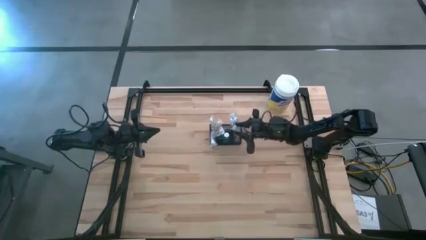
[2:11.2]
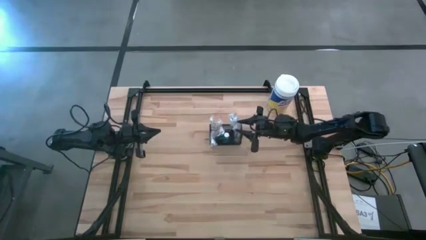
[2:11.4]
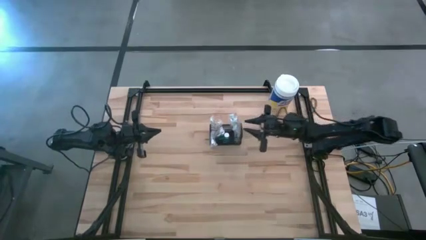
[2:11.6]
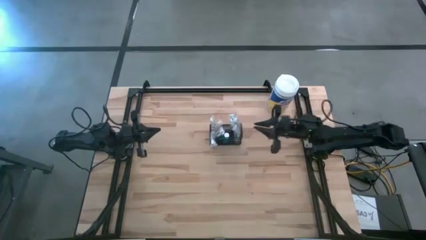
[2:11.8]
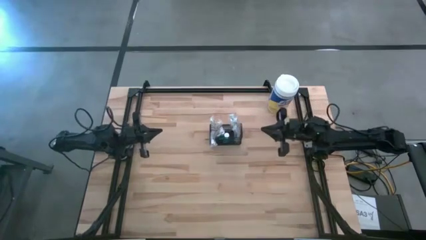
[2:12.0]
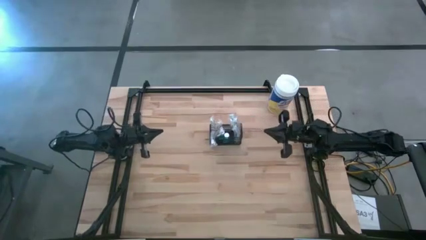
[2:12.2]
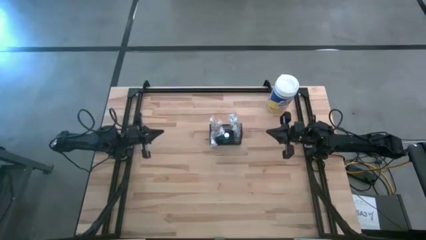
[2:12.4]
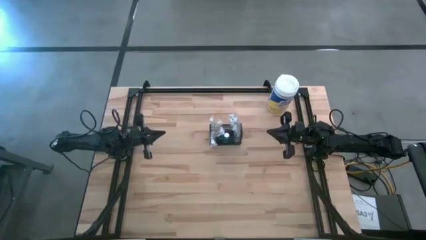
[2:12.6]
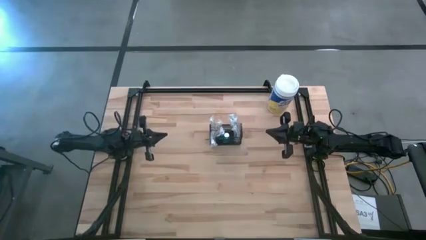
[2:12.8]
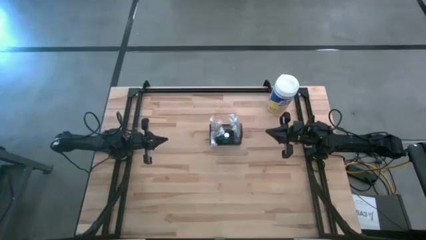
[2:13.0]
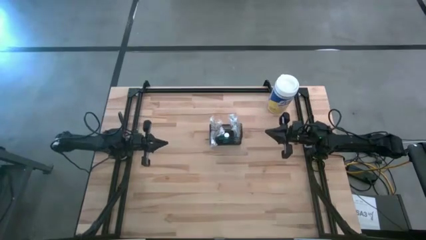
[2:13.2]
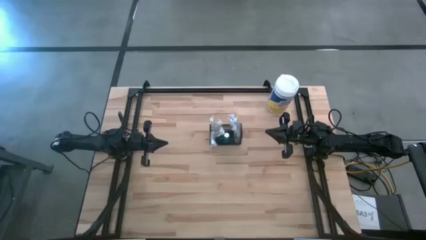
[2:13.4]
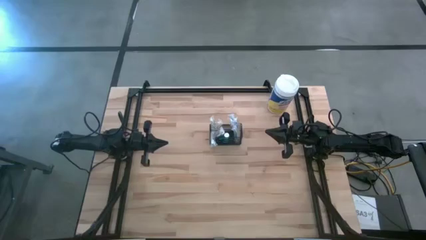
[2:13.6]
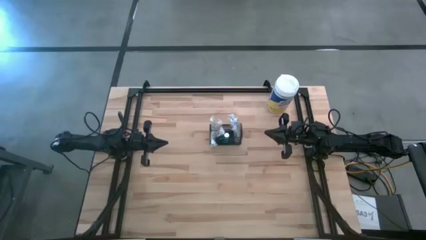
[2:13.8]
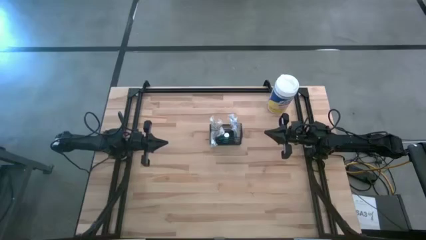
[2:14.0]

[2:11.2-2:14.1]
Task: Pick & Place toothbrushing station
Return to Home Position

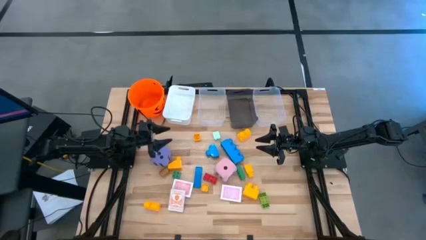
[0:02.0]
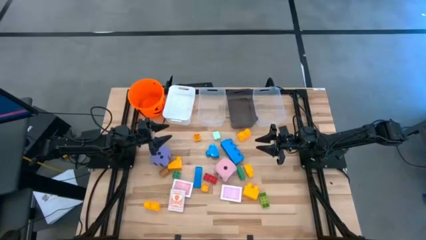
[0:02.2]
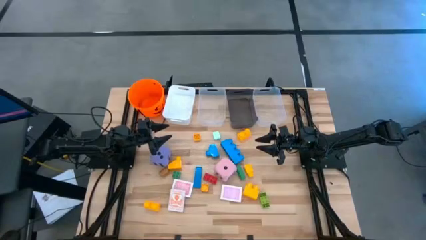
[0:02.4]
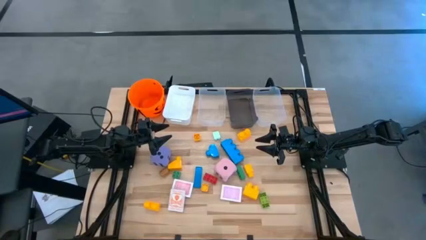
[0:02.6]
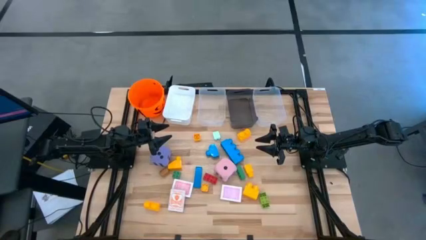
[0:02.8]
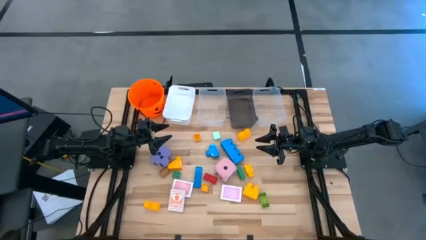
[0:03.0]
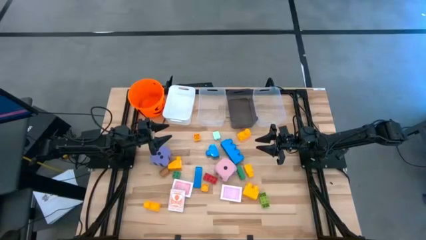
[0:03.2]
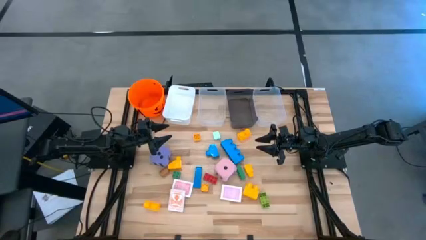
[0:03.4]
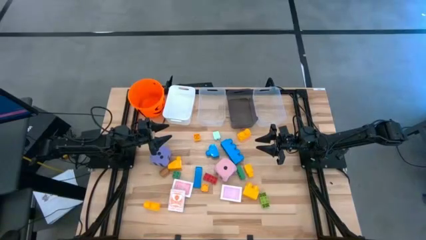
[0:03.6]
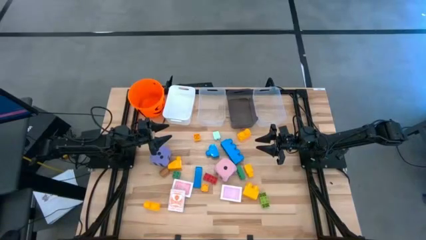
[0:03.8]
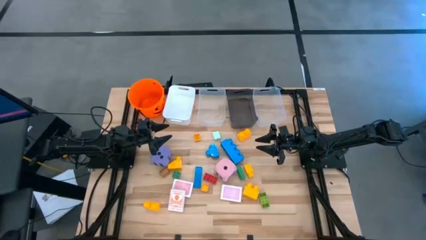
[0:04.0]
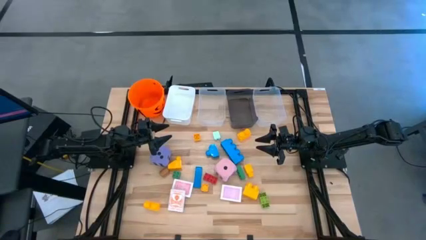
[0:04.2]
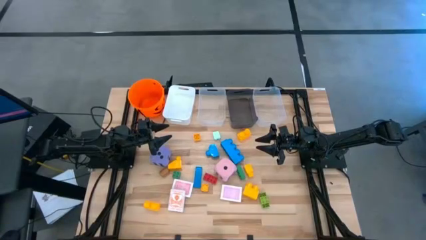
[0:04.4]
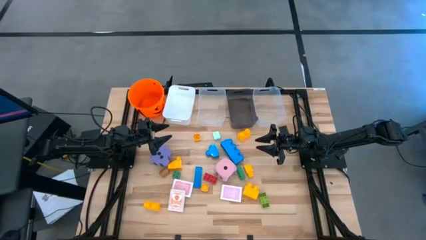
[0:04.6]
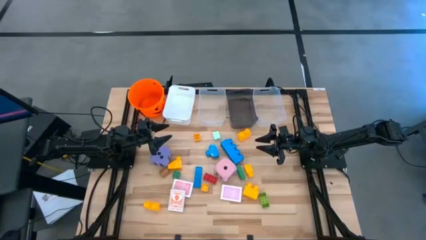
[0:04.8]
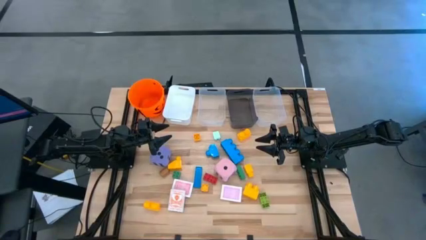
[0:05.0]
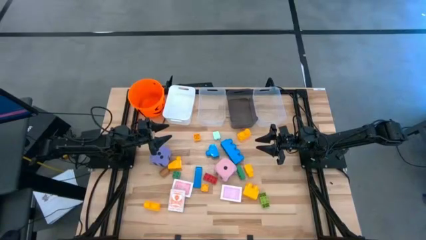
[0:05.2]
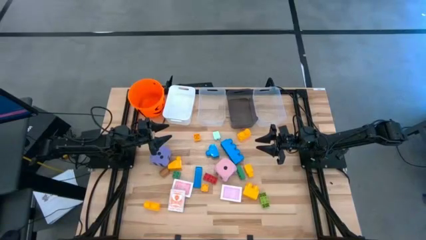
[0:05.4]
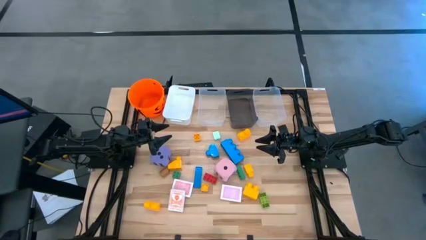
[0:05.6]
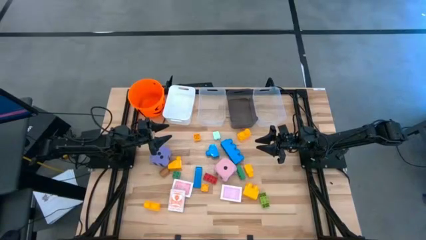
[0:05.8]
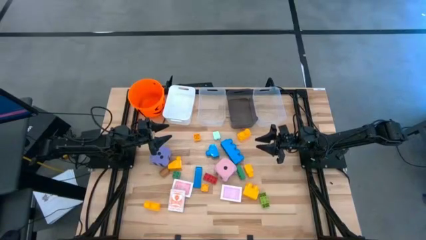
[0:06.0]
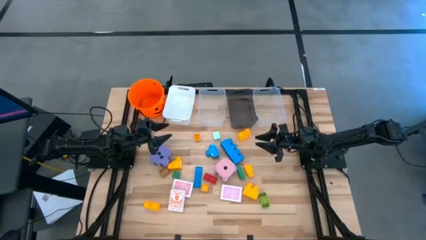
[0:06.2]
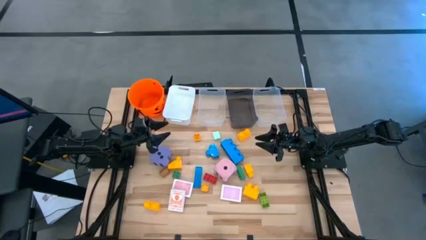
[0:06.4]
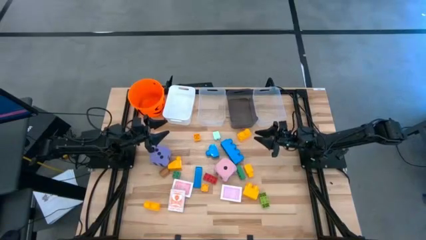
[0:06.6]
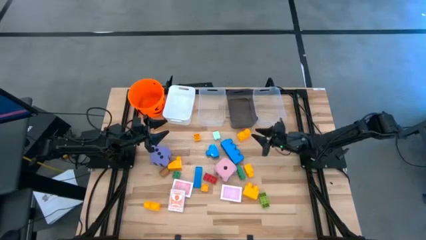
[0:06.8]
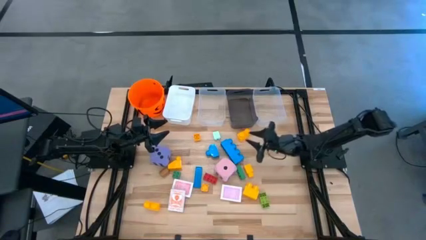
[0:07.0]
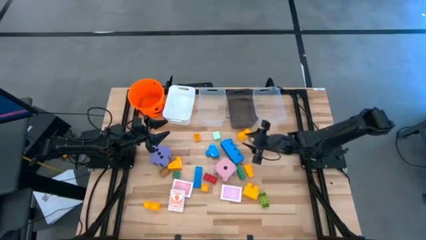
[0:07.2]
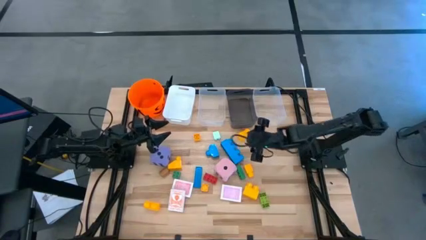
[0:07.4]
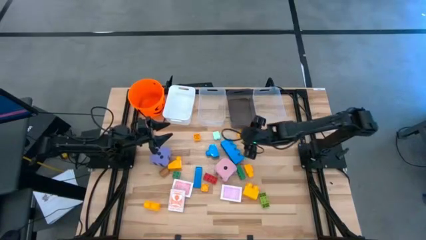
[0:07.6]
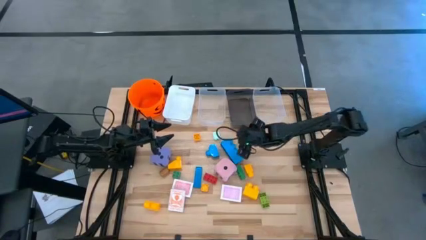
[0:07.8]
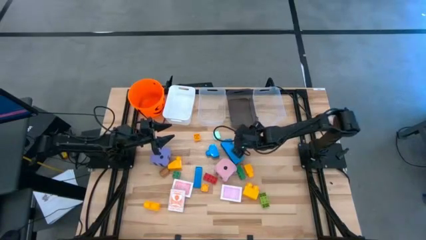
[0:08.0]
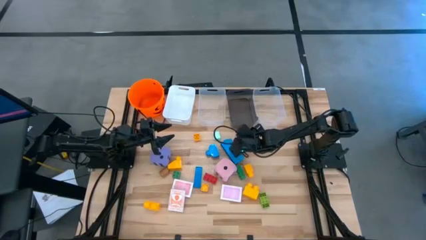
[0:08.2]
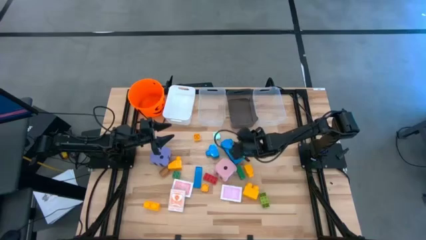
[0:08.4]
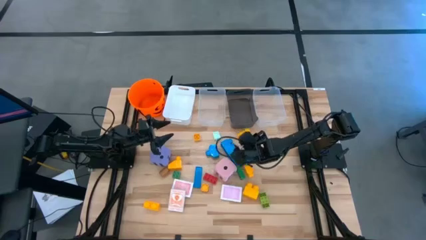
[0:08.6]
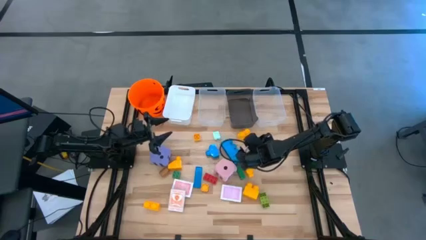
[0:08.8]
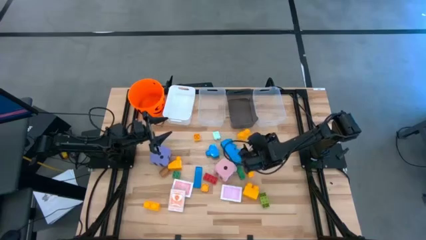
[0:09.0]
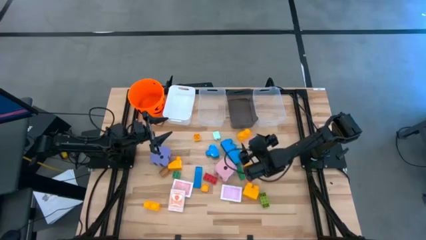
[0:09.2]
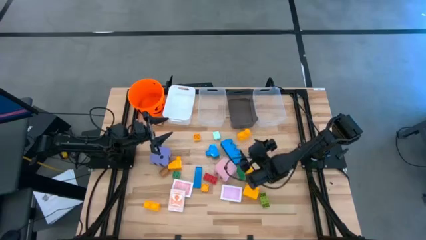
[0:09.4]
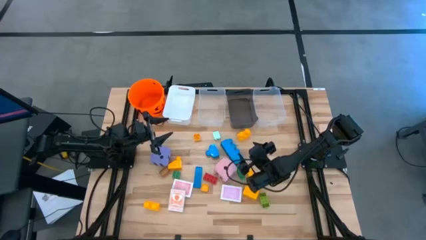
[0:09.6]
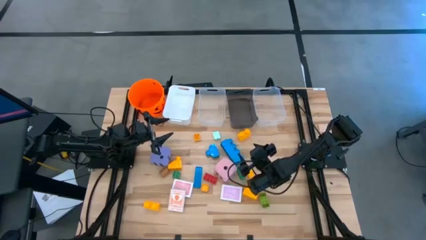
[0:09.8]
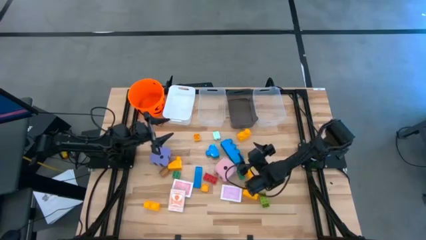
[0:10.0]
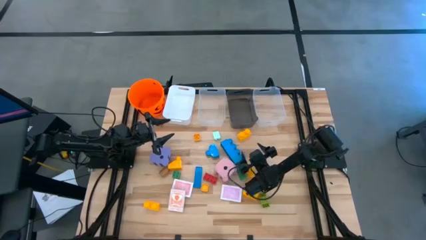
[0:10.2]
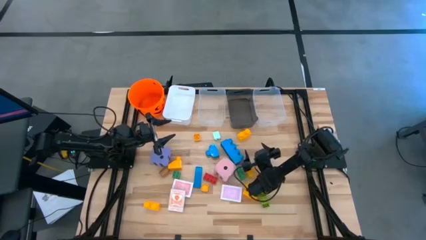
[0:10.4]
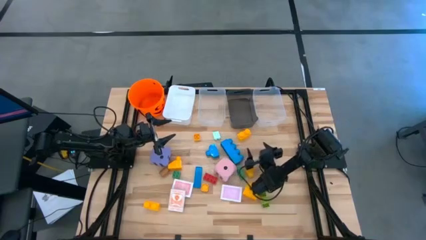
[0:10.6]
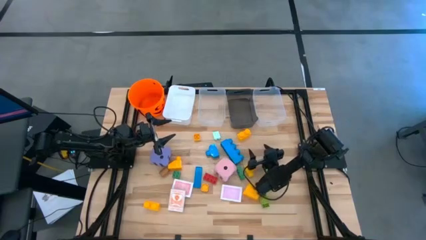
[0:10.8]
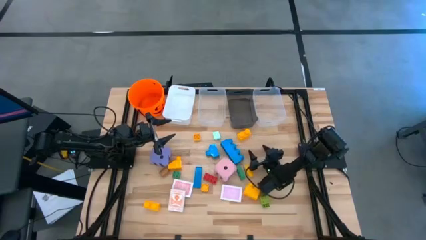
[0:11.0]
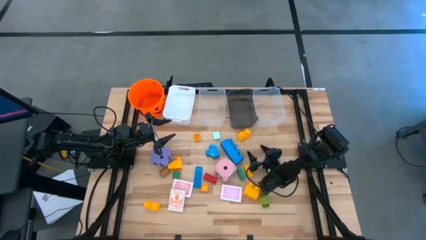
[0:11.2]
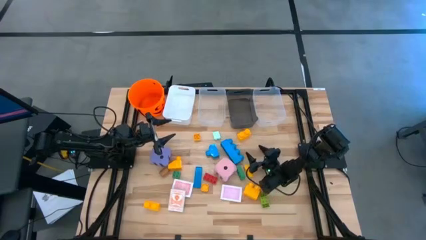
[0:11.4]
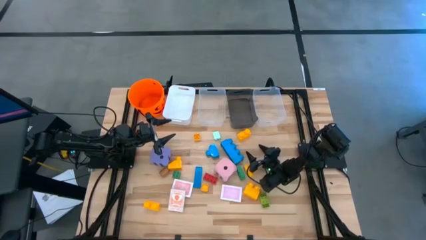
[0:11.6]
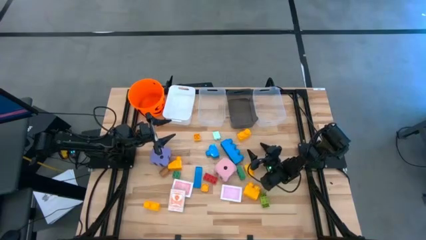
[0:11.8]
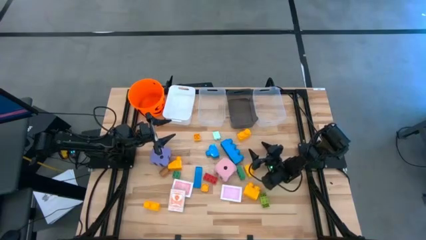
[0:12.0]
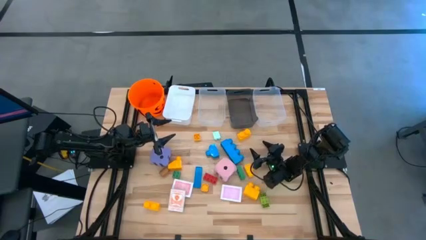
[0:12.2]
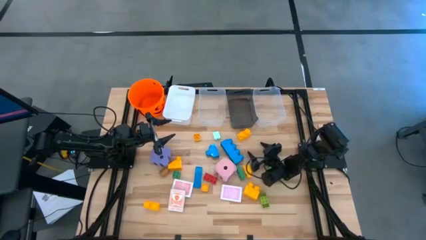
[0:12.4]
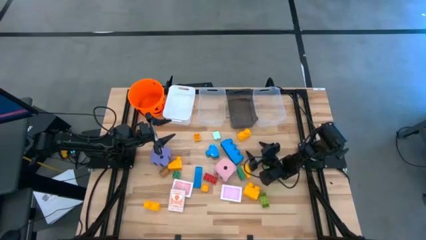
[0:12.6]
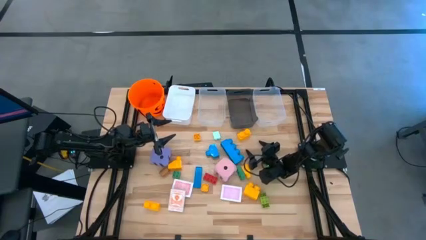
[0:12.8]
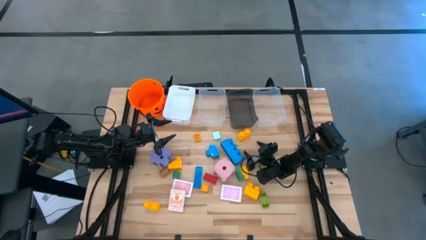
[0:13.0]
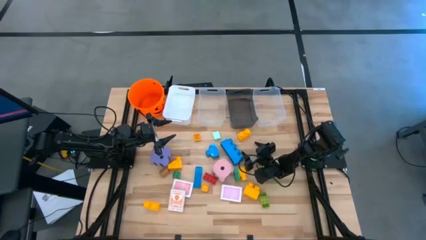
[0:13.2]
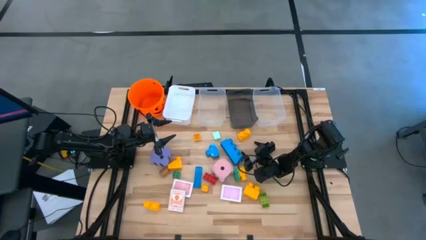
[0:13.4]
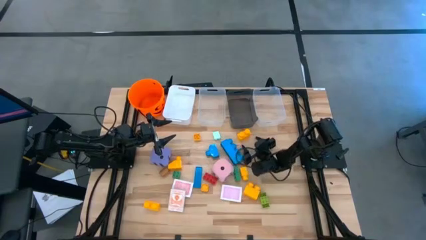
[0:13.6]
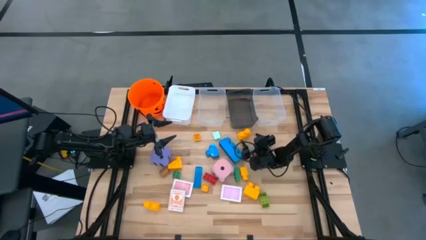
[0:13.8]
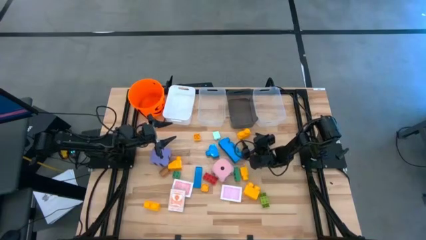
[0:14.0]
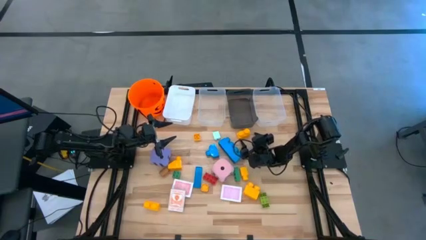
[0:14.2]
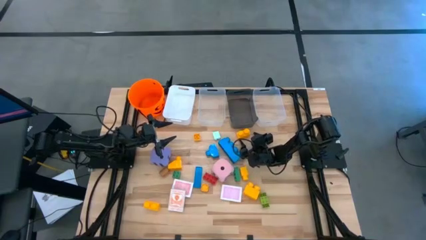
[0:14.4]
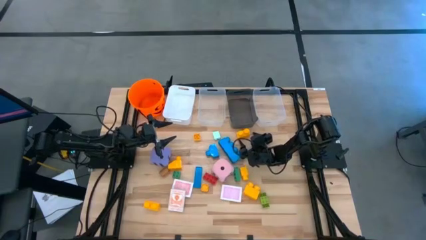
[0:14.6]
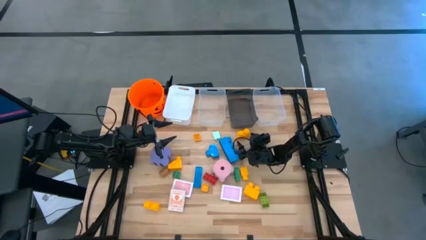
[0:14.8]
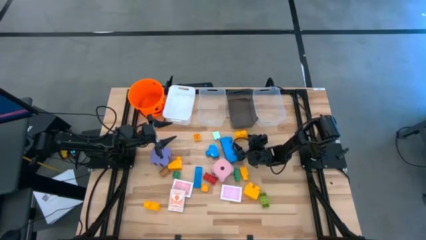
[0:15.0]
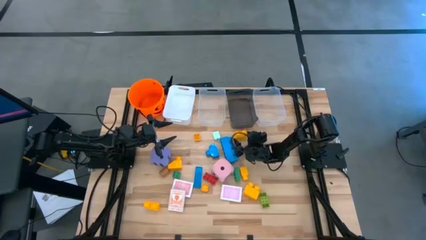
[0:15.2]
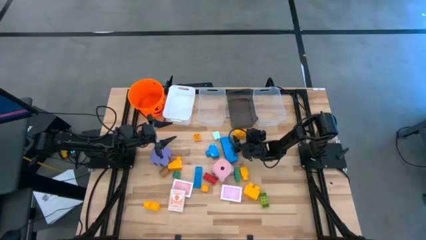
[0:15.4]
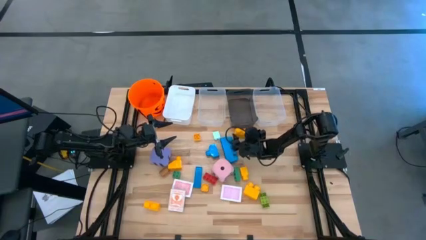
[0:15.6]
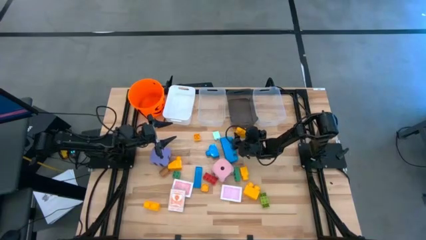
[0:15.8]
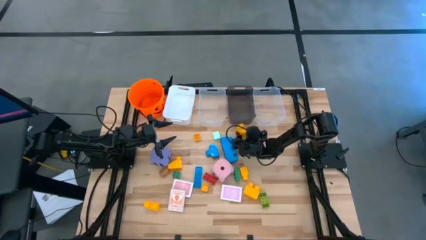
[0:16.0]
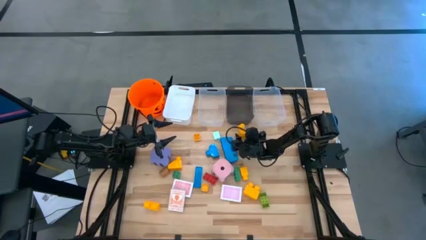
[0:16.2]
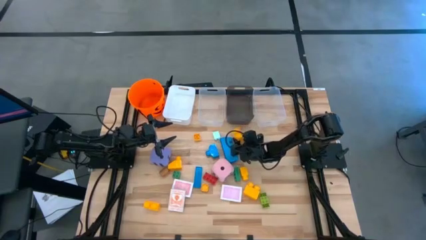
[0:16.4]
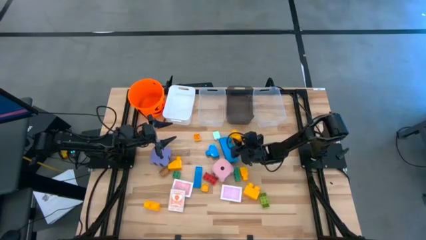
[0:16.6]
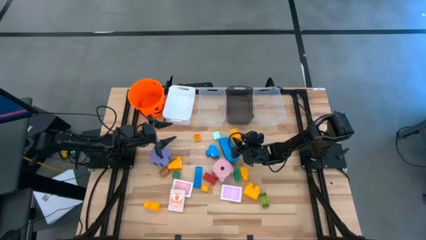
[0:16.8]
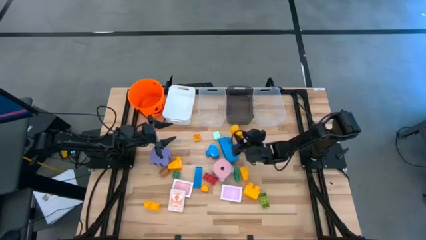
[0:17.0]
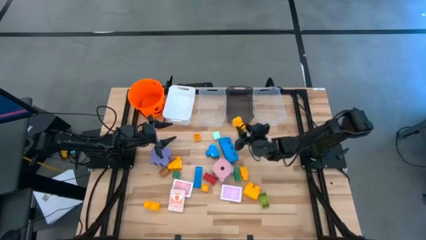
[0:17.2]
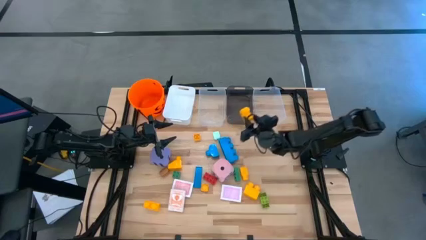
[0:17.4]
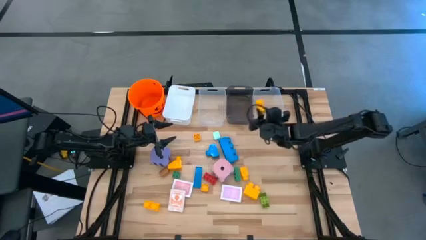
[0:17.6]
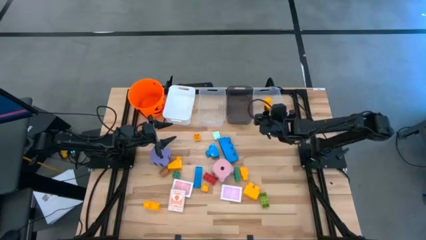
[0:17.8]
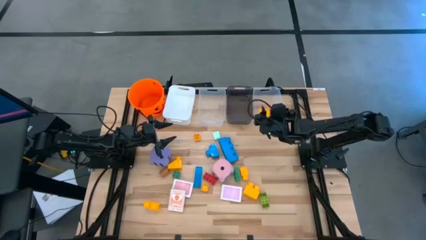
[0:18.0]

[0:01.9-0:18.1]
Task: Pick & Place Toys
Put the big yellow game piece into the right transparent bin
